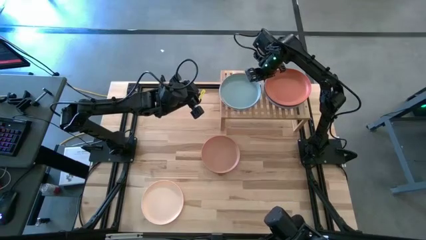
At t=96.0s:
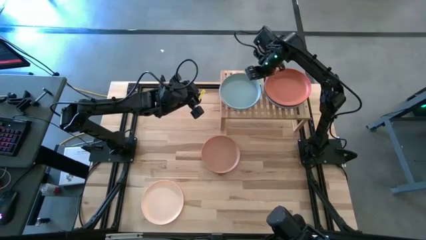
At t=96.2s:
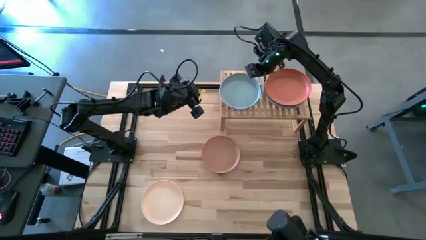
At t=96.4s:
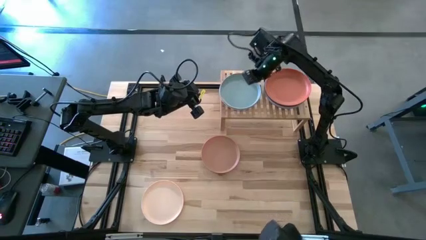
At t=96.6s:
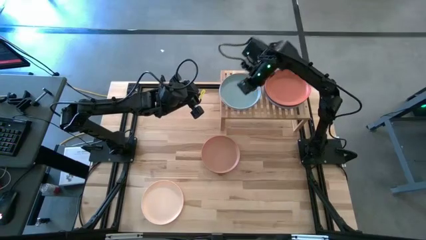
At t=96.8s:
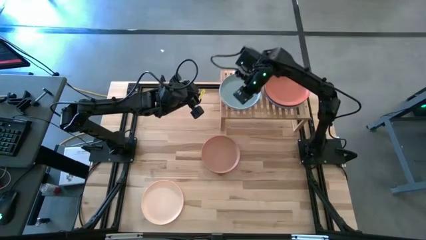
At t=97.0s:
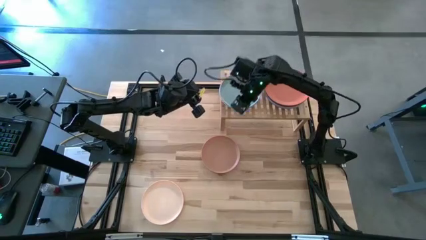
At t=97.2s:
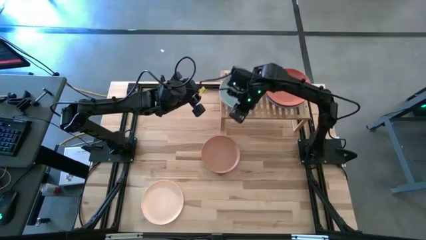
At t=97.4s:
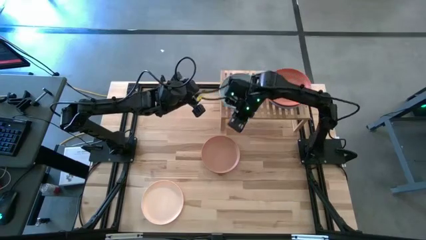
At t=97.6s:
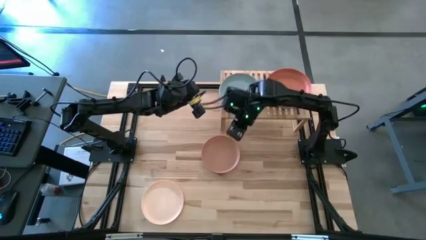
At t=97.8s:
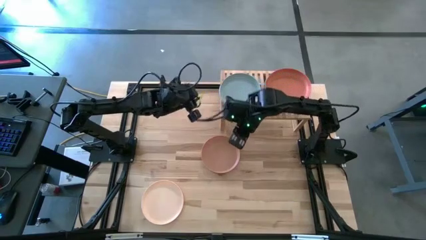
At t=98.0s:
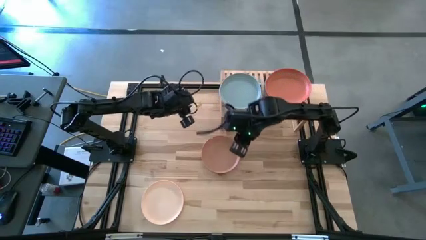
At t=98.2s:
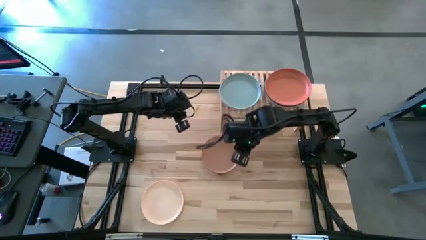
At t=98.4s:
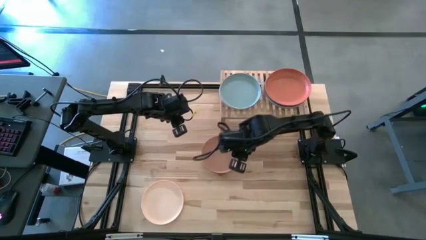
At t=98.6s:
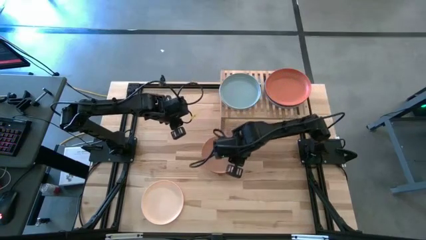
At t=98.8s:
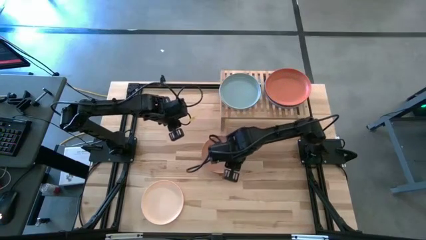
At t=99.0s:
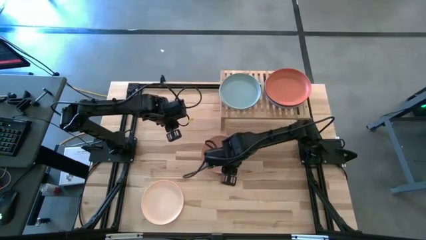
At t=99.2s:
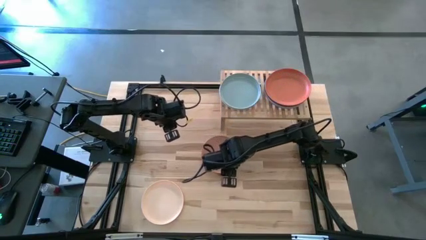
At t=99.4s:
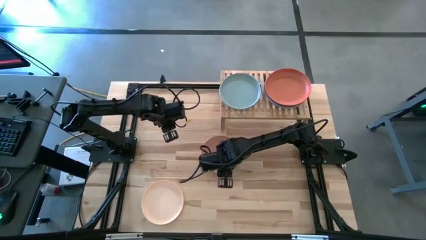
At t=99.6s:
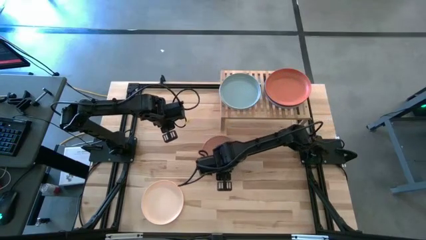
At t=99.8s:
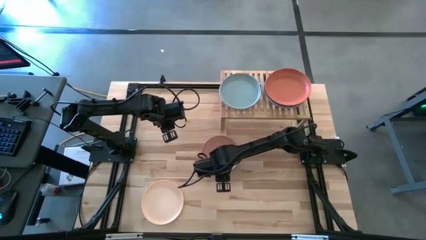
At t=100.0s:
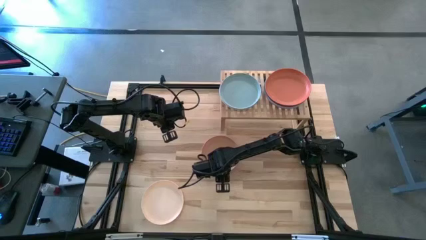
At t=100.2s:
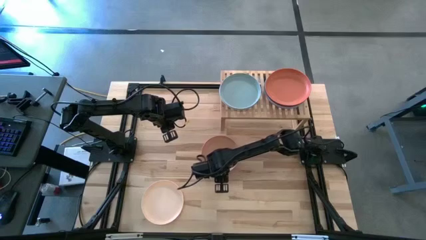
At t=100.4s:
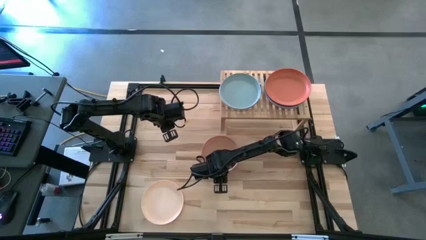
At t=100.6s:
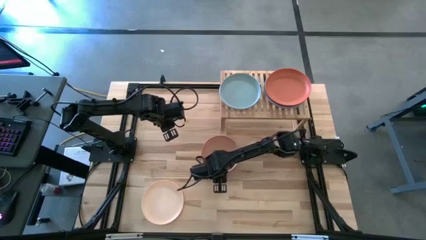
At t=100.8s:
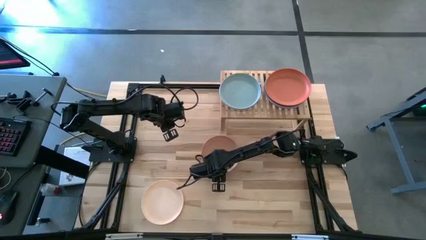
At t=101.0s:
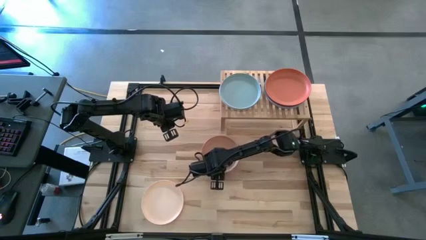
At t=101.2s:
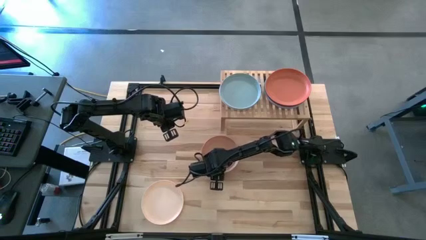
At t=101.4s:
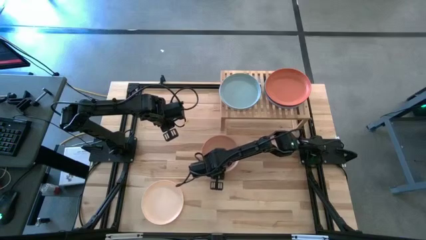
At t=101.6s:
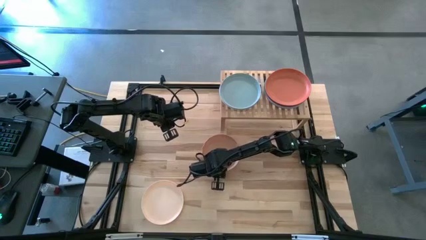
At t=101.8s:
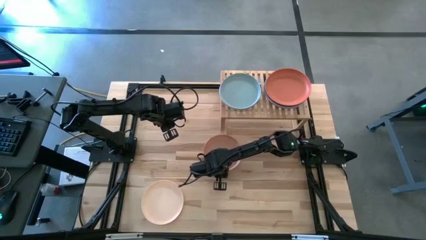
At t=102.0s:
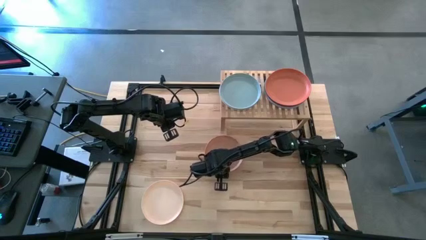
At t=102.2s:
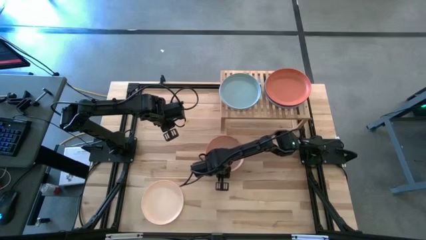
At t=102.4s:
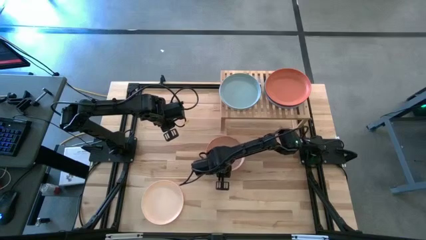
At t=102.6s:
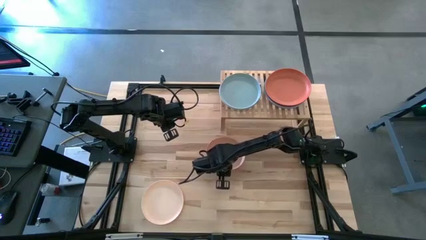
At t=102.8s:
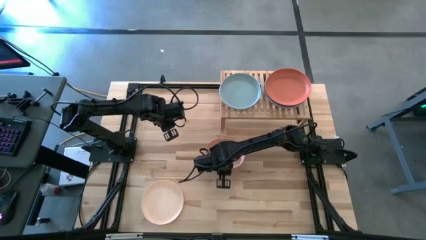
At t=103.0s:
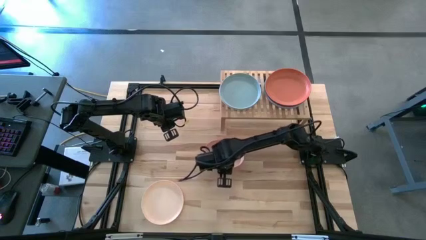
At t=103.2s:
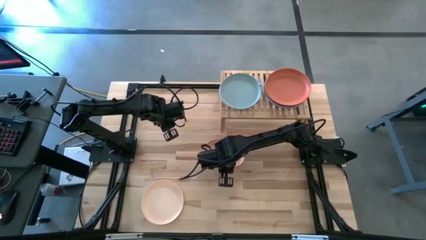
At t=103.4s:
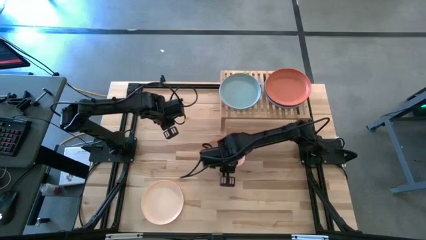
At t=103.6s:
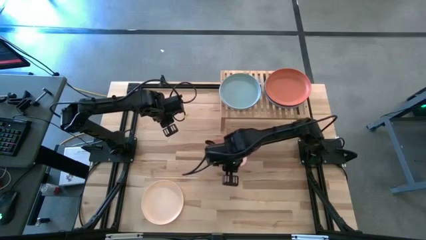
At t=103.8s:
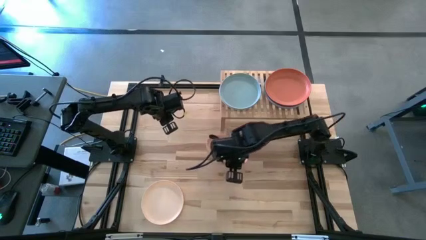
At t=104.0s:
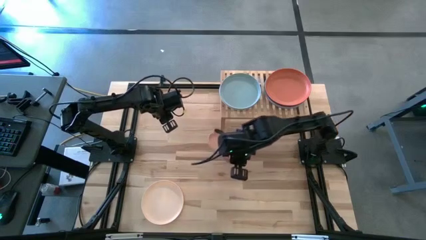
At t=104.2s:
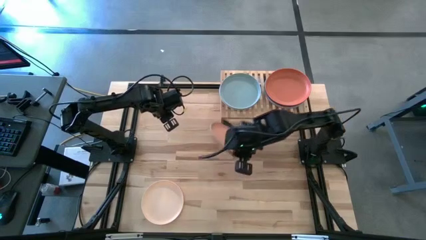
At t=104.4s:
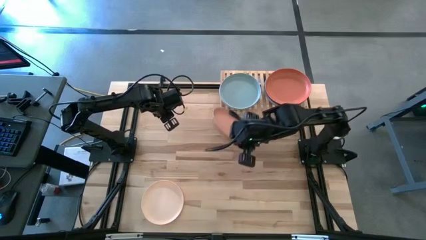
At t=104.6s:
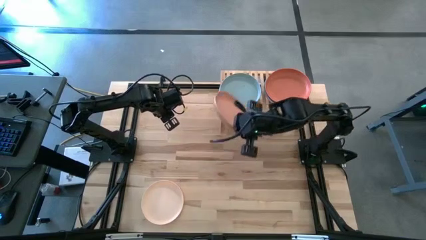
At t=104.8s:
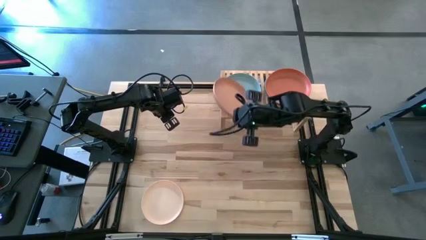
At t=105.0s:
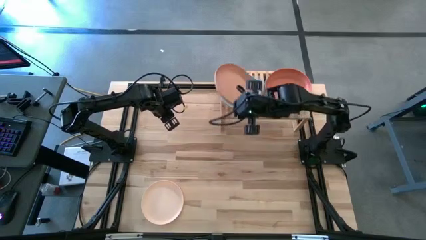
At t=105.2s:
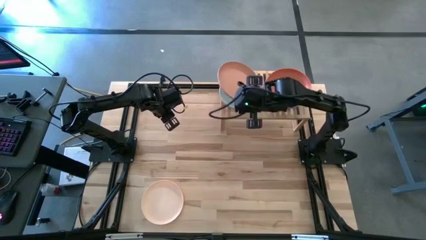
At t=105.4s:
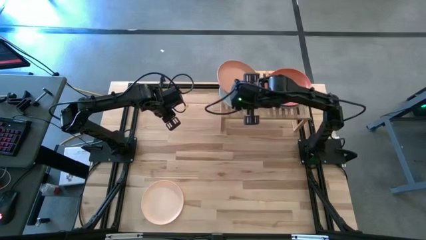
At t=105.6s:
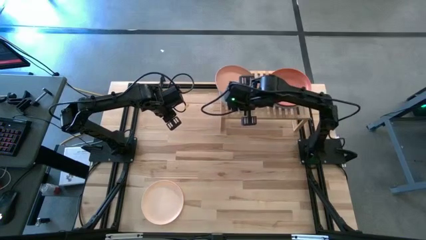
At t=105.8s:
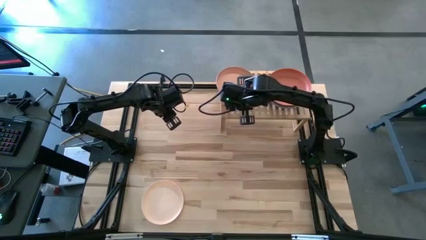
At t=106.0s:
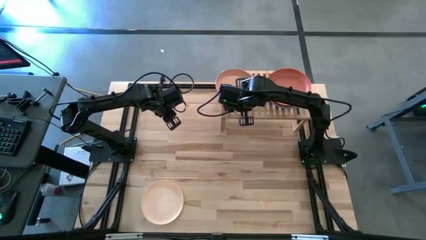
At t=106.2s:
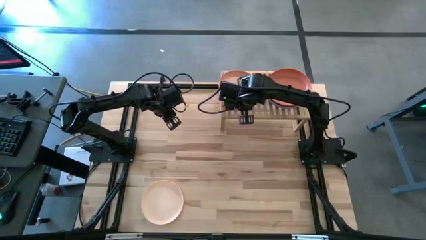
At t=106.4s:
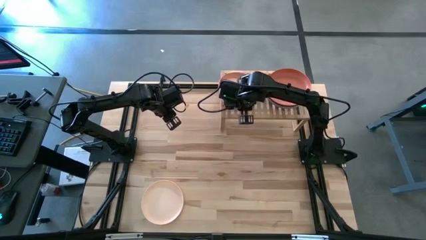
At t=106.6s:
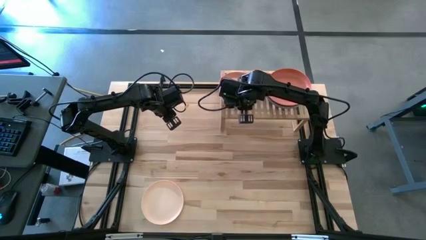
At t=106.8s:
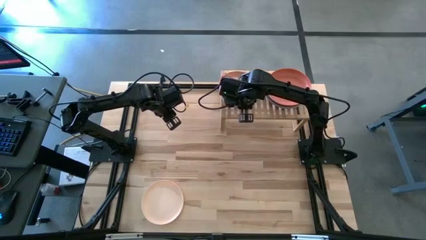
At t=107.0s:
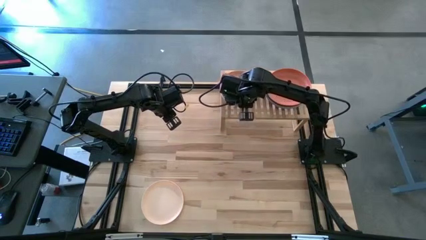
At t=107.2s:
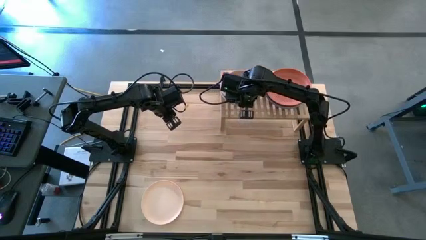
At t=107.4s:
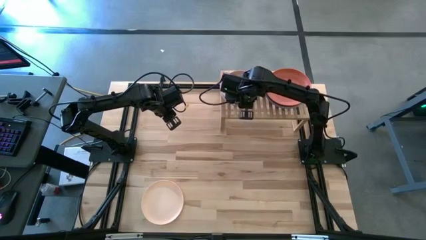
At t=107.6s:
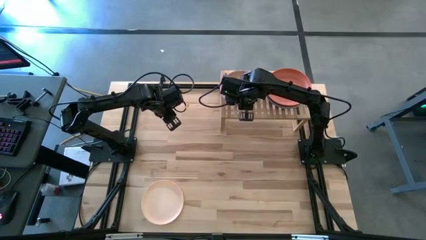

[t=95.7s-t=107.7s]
Task: Place and stack plates onto a shelf
Stack the brown plate on top of the gray plate on the shelf

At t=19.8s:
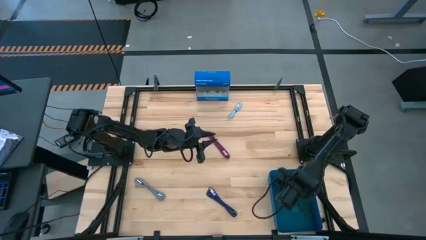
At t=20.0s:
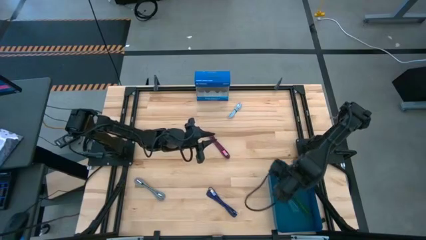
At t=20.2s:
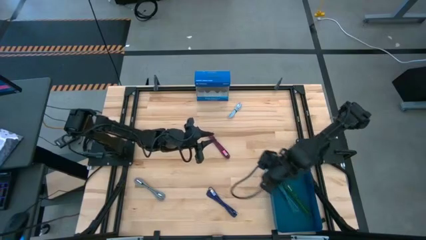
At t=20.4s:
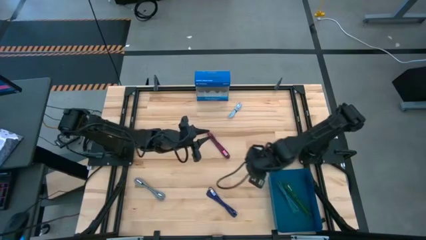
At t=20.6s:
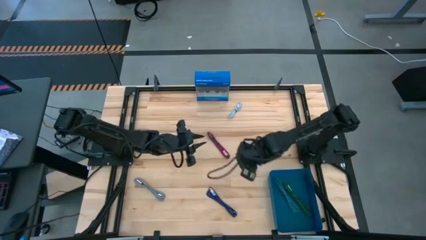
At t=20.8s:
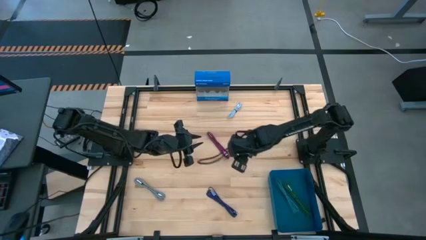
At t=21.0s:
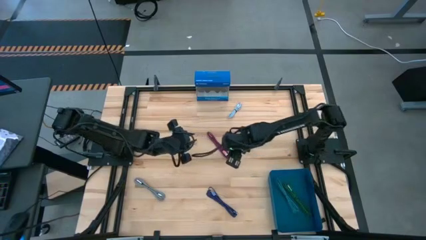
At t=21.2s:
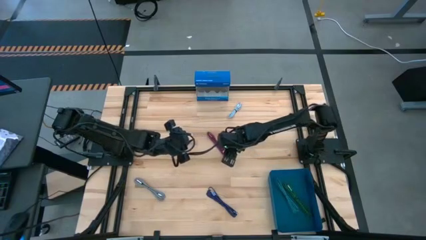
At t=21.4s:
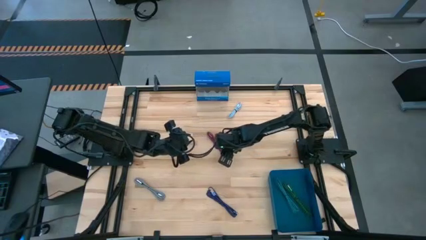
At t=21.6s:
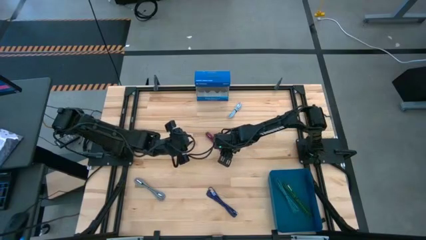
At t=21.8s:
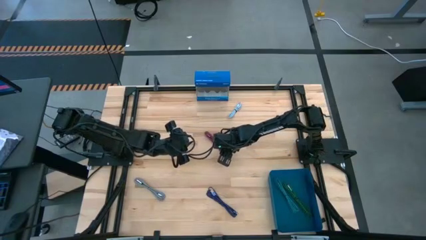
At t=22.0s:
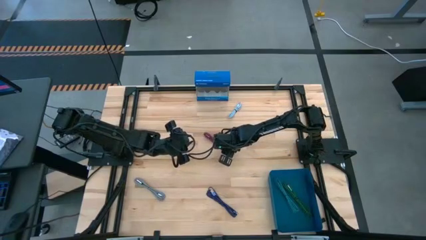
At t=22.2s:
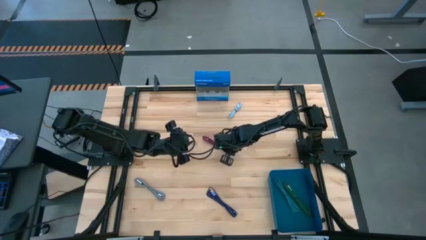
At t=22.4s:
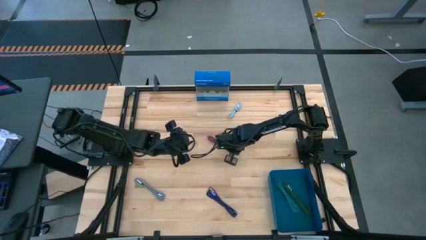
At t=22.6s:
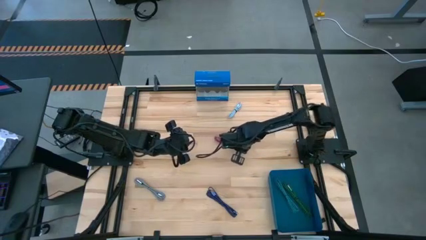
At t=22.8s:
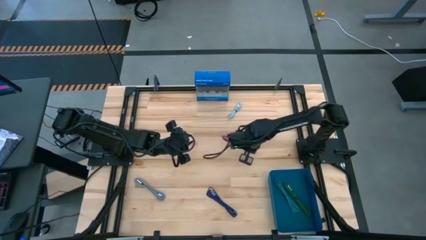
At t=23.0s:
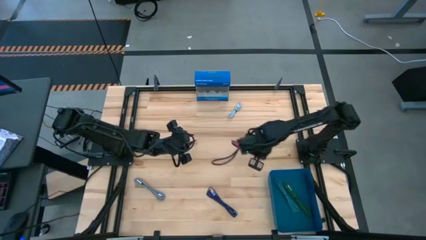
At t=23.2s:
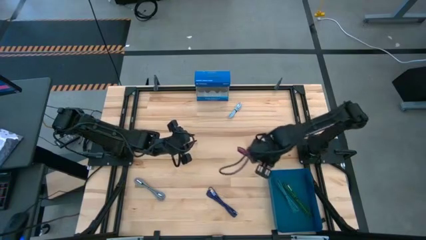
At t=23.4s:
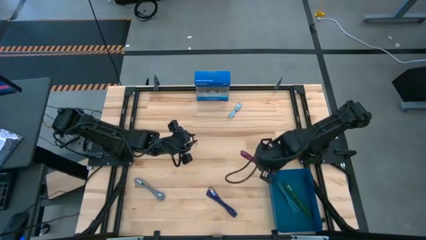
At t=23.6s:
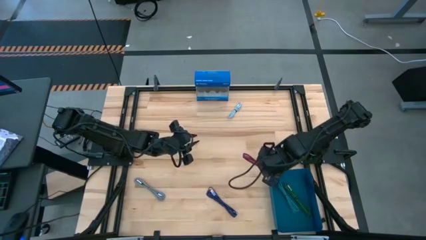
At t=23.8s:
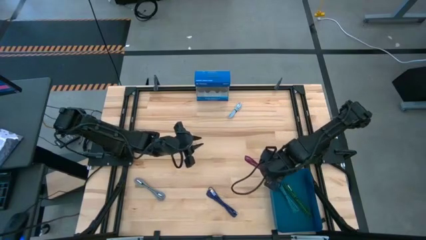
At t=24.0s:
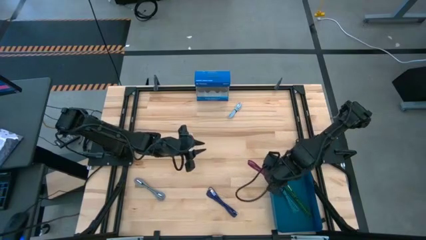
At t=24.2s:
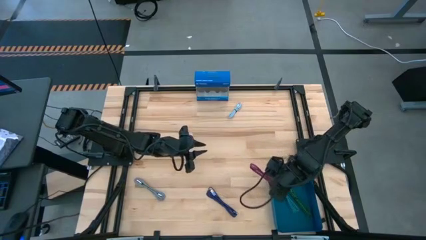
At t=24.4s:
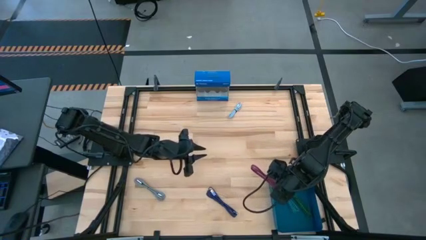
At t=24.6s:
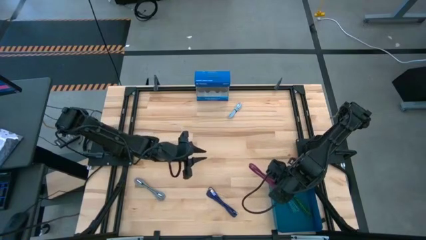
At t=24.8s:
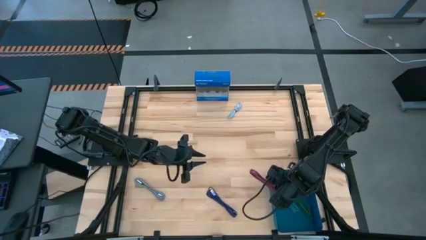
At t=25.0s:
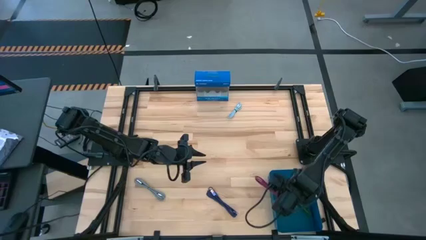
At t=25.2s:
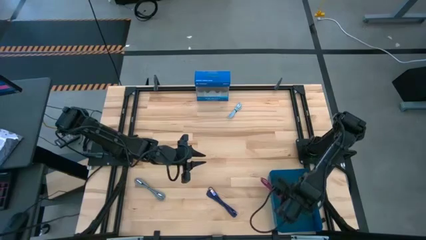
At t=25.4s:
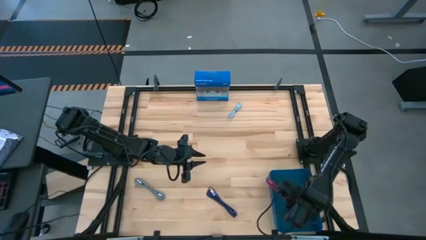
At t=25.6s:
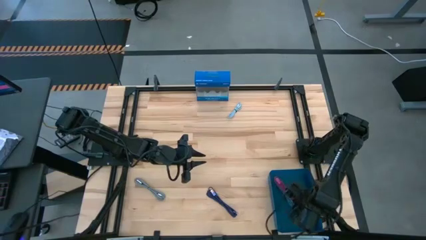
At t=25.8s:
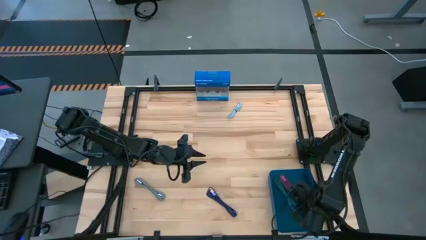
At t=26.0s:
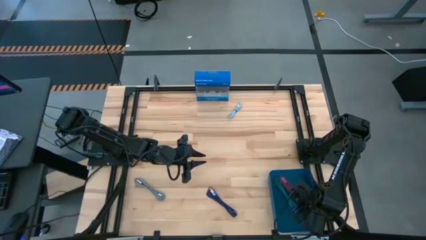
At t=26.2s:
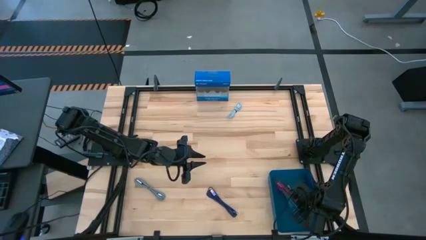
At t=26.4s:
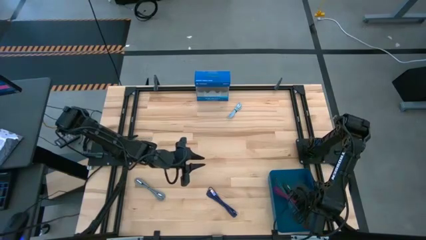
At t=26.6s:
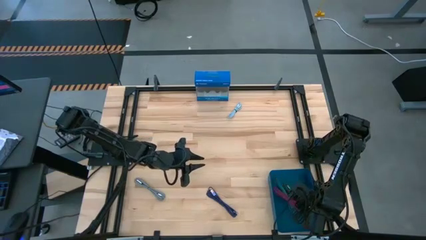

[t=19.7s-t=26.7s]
Task: Pick and place USB-C Cables
Put the red USB cable into the blue bin
